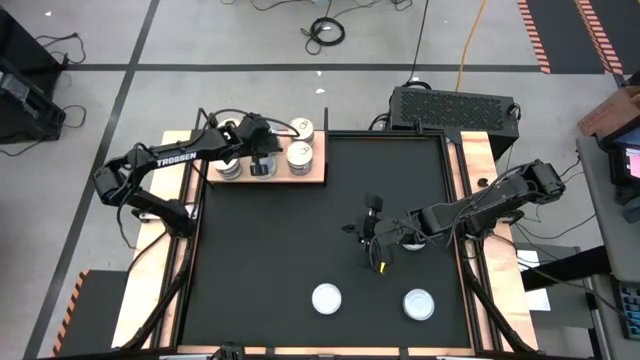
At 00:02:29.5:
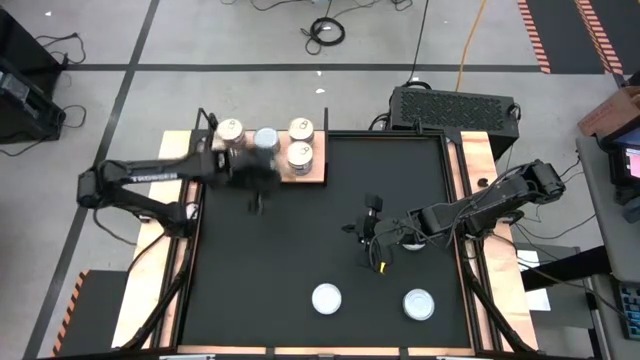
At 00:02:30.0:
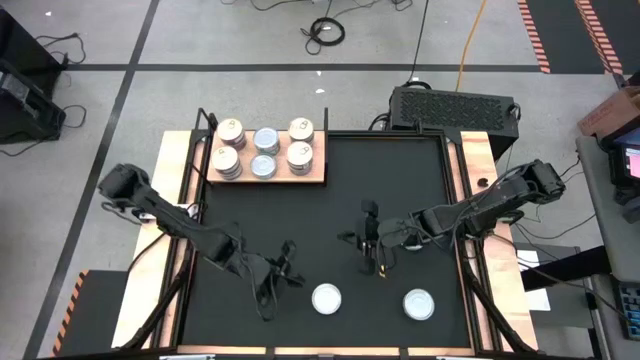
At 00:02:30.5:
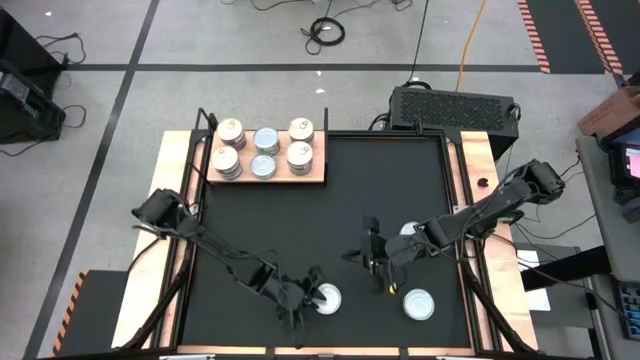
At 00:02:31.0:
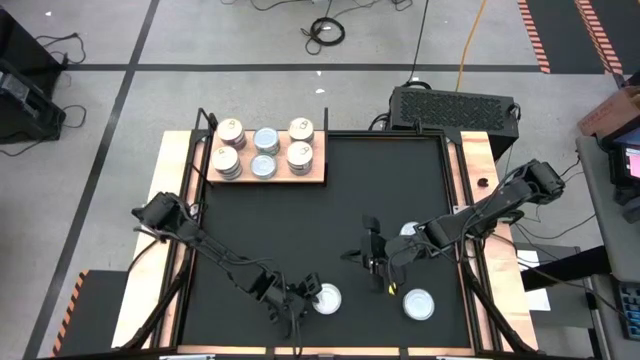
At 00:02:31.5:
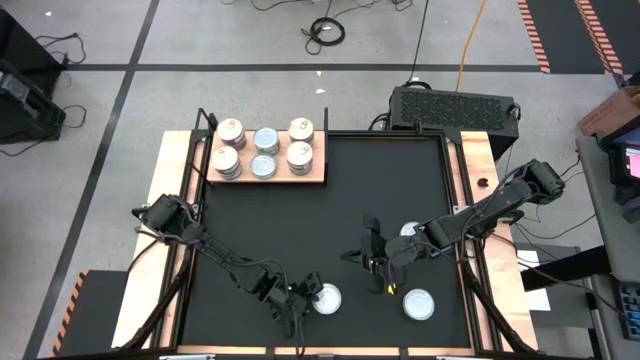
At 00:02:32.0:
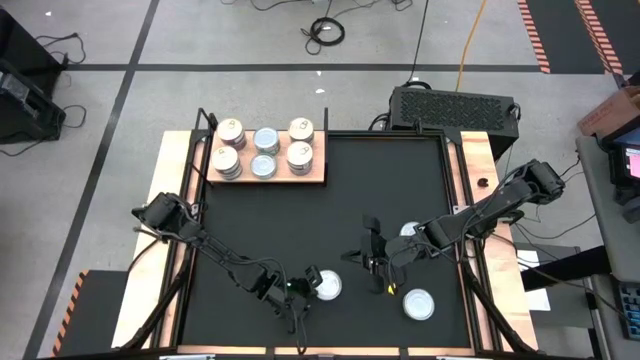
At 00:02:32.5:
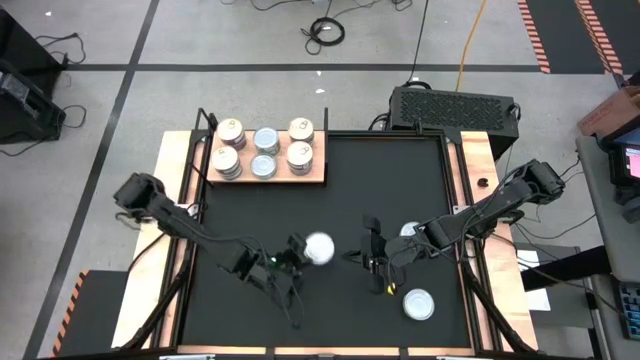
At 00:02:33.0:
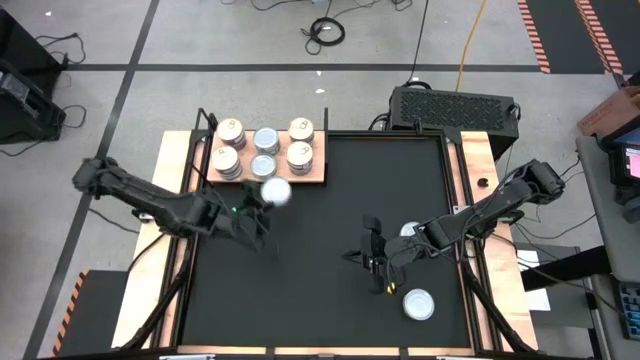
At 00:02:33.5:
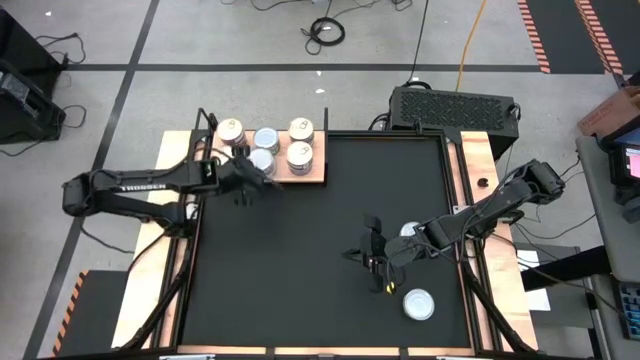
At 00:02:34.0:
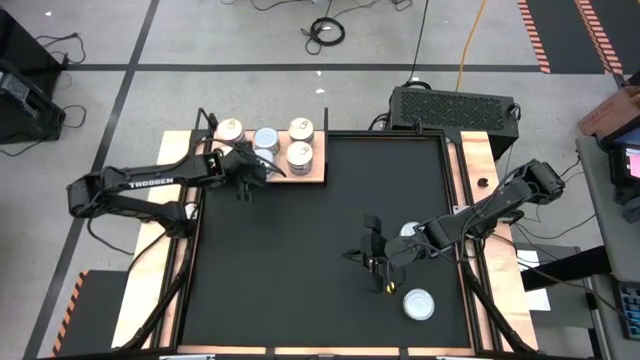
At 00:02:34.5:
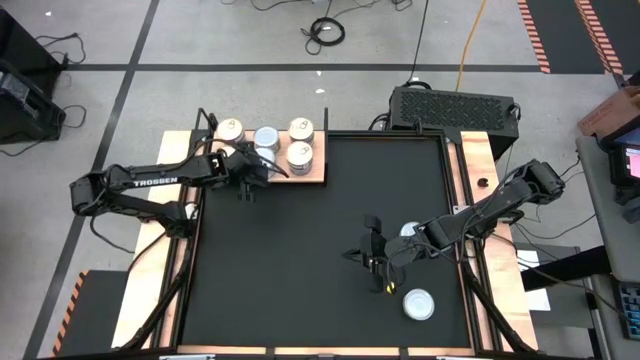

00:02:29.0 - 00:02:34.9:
Task: Stack canned seafood by type on shelf
Stack the green tuna can on top of the other green tuna cans on the shelf

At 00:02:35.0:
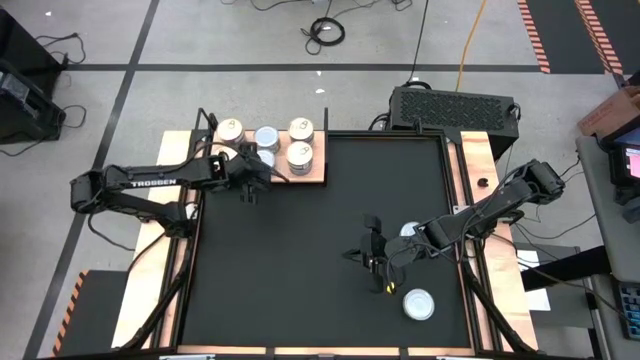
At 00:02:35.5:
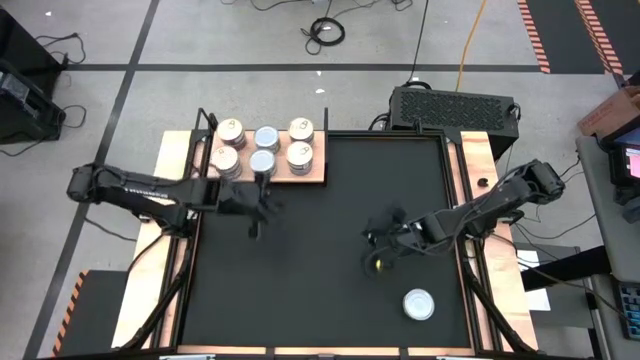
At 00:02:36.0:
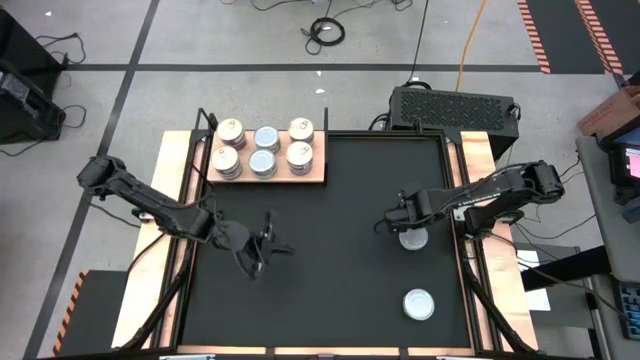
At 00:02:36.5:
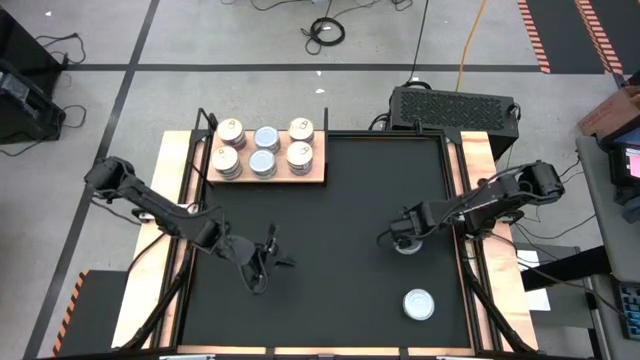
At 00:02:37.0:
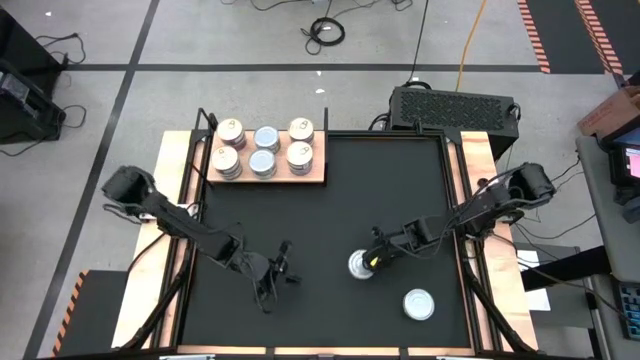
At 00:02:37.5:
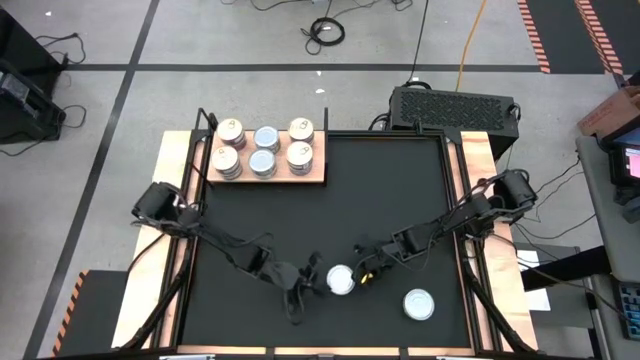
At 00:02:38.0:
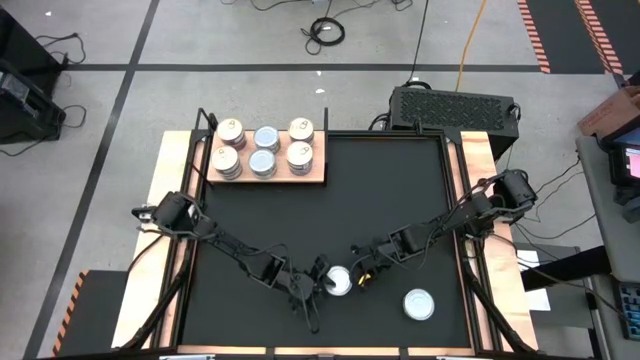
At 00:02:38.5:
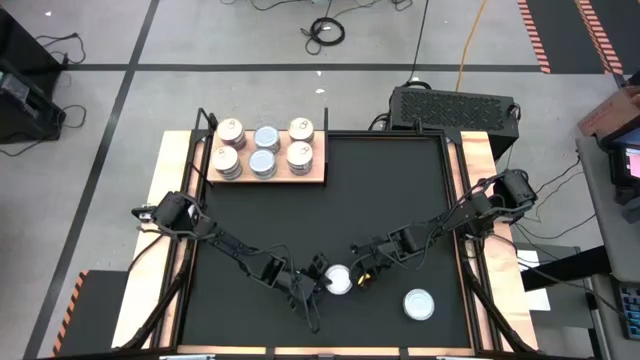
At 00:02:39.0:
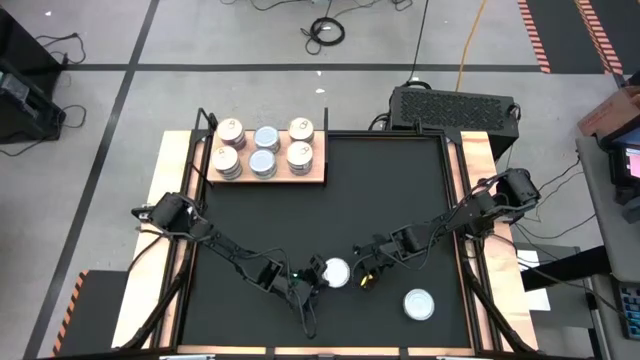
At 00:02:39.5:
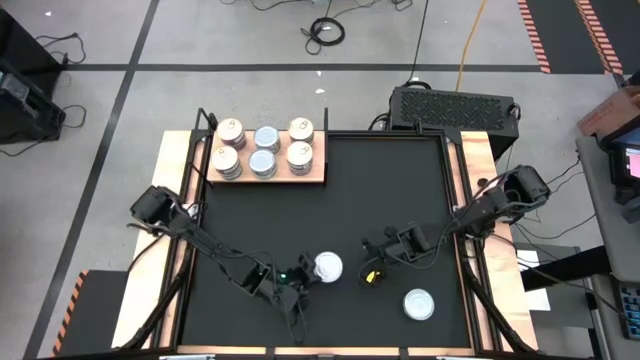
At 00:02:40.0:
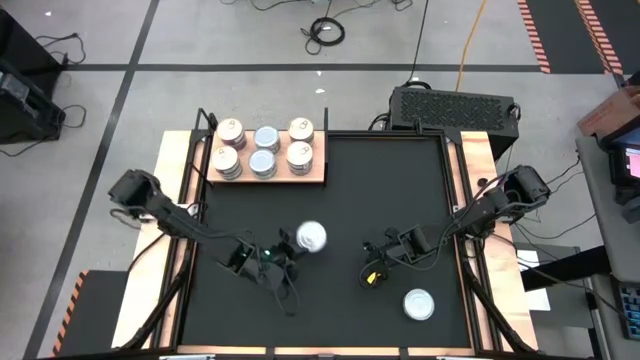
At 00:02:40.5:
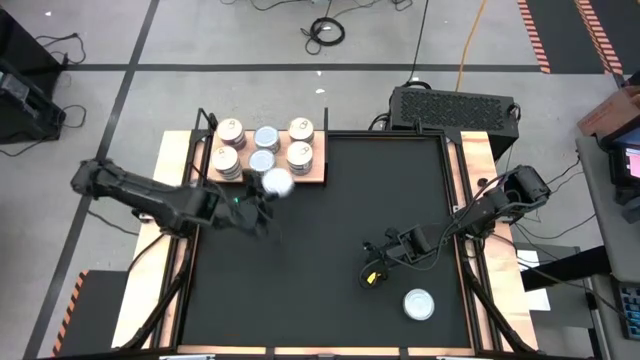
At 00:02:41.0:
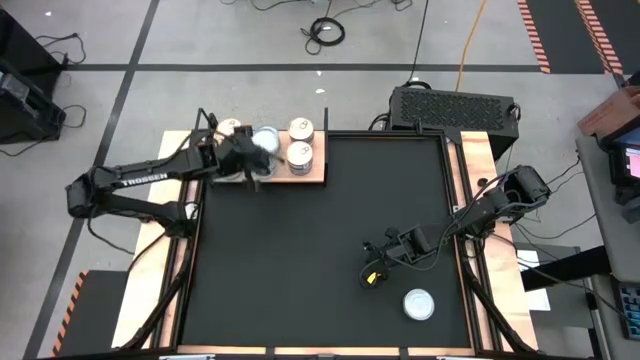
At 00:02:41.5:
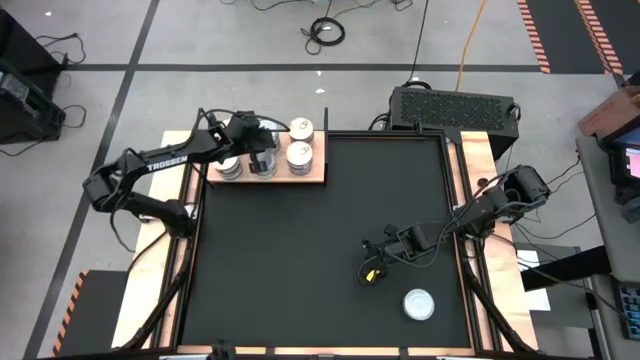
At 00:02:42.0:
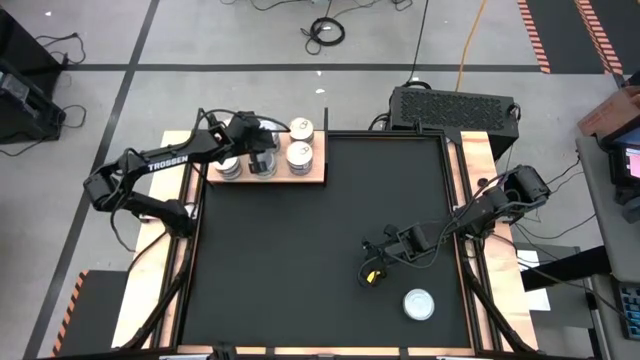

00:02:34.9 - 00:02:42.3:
Stack the green tuna can on top of the other green tuna cans on the shelf

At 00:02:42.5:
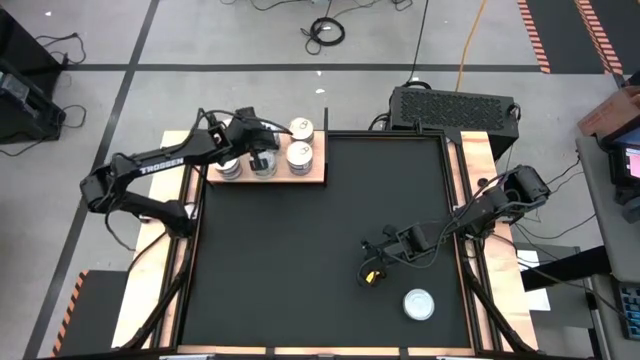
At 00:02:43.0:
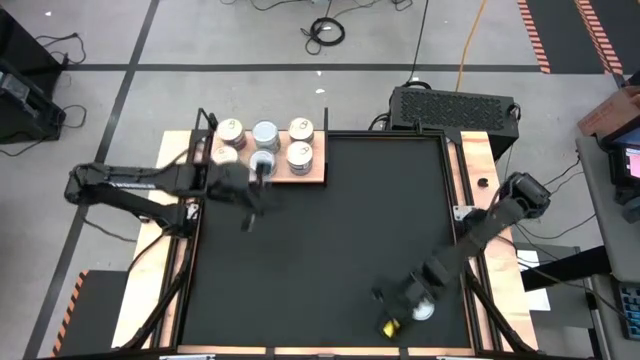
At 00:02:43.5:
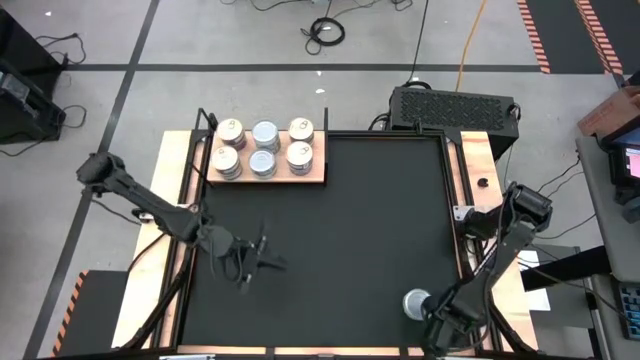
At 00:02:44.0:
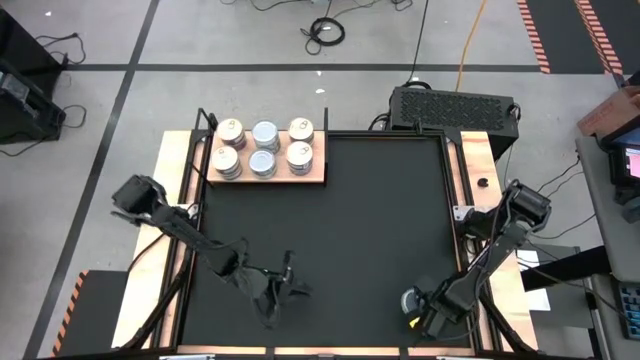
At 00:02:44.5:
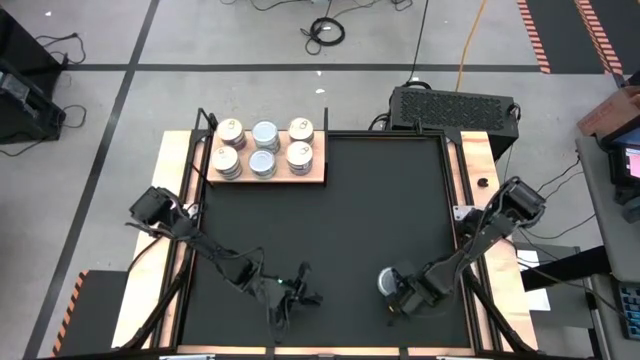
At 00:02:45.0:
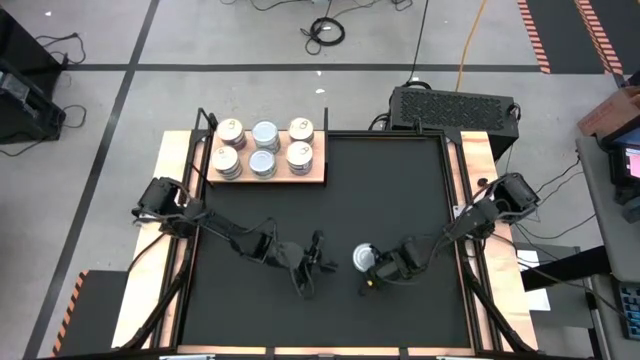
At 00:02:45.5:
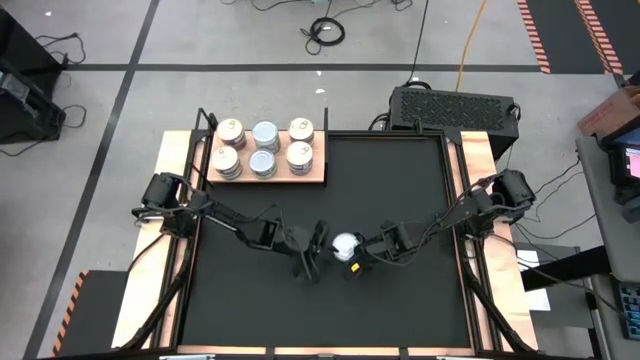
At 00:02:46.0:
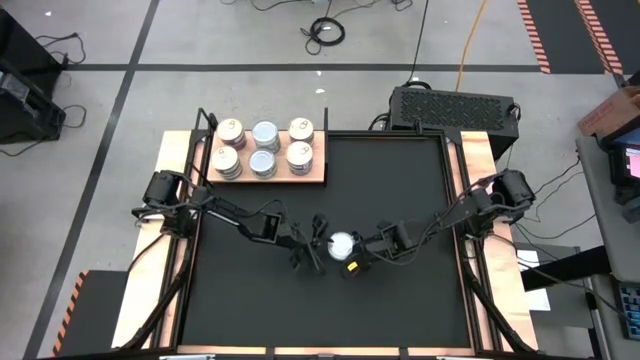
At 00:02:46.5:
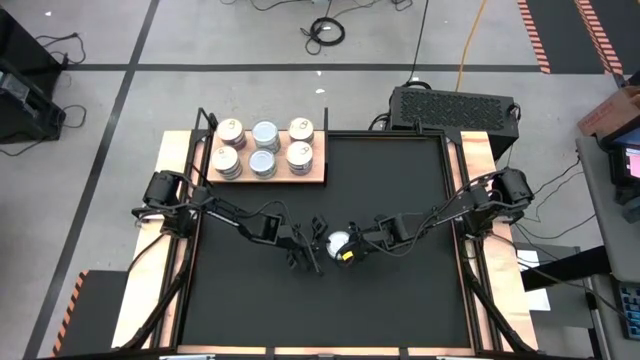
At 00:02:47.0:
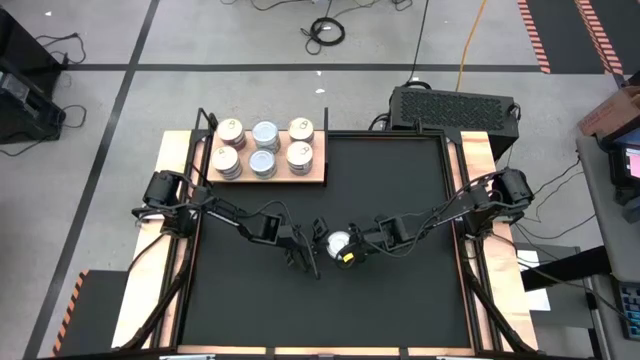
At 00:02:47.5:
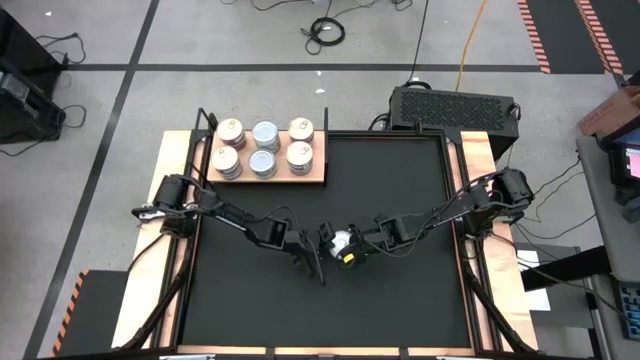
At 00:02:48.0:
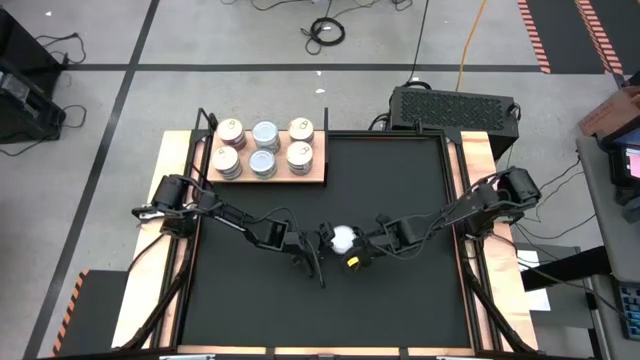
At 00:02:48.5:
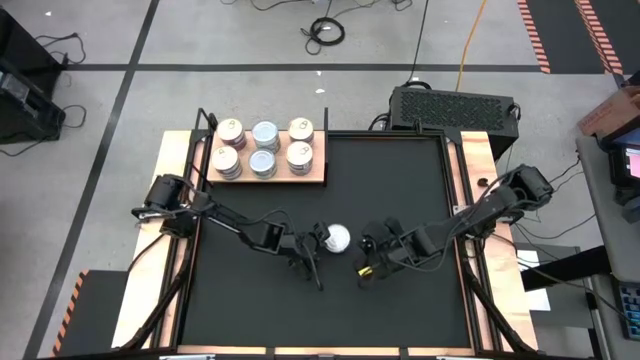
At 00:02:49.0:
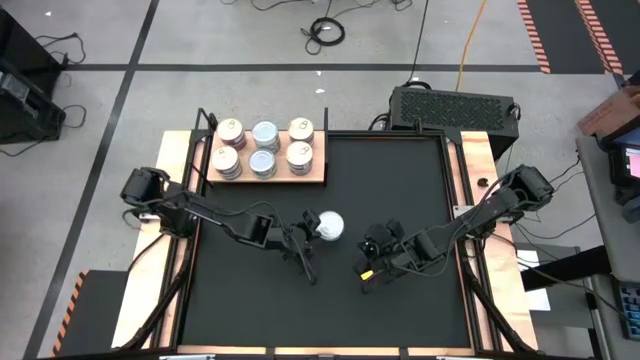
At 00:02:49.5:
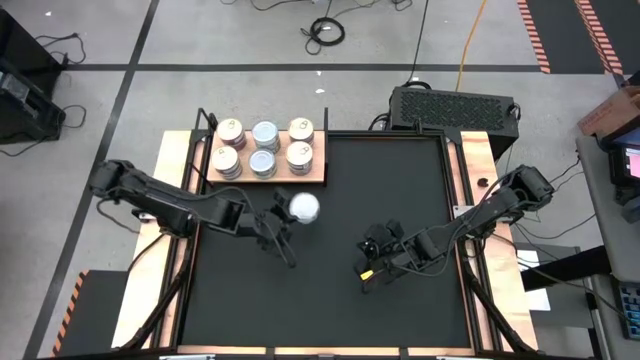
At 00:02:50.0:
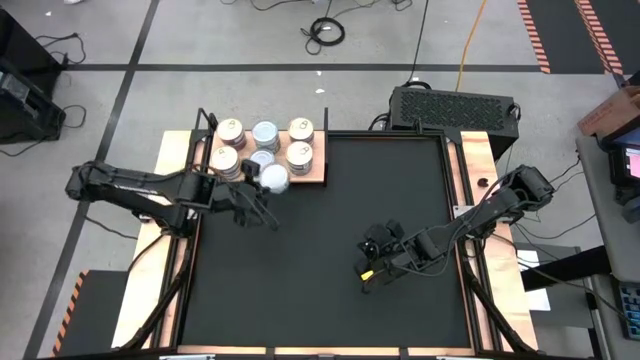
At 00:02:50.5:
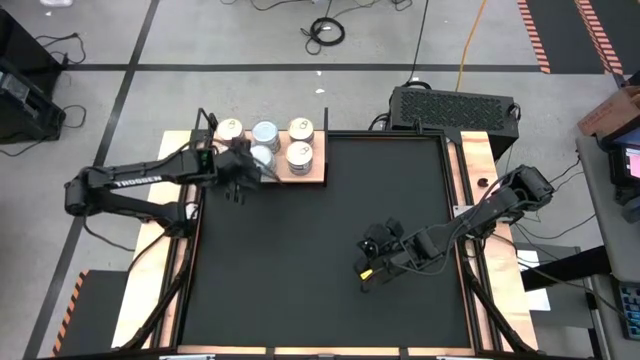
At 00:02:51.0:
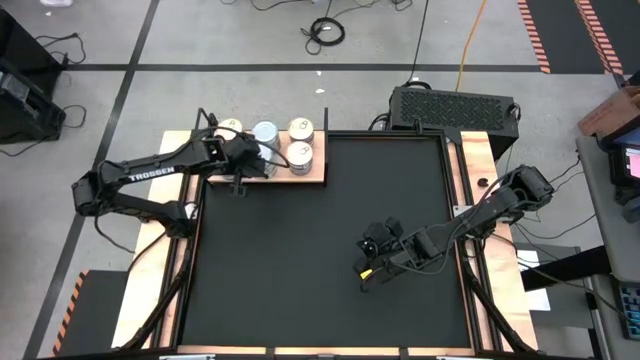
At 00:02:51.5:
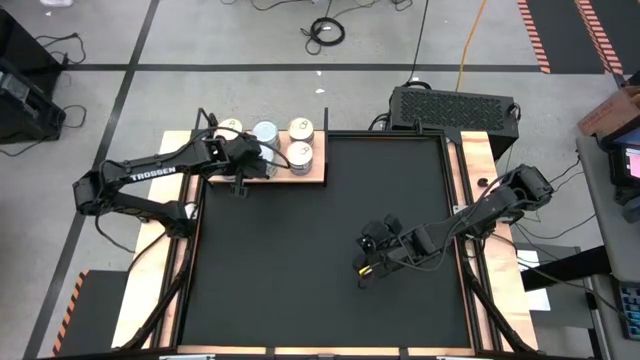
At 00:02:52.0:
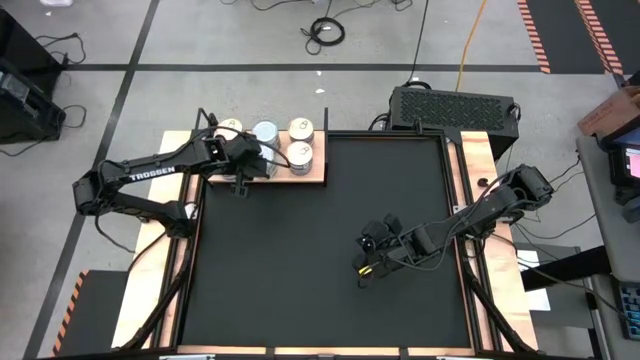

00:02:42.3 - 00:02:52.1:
Stack the green tuna can on top of the other green tuna cans on the shelf
